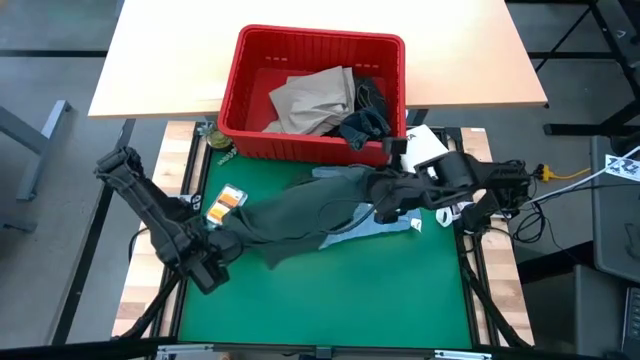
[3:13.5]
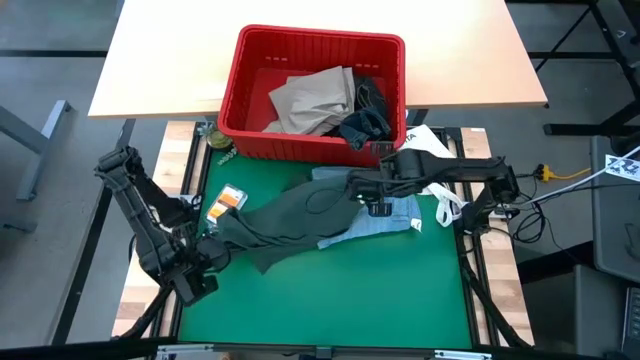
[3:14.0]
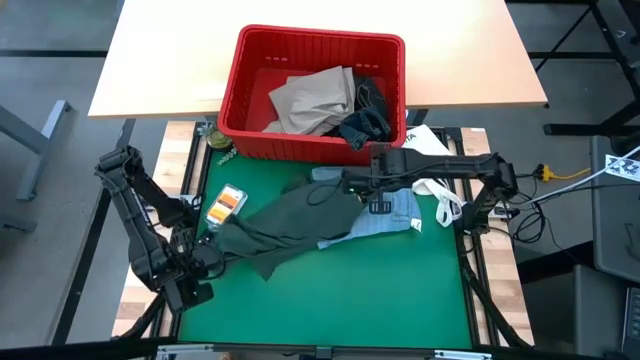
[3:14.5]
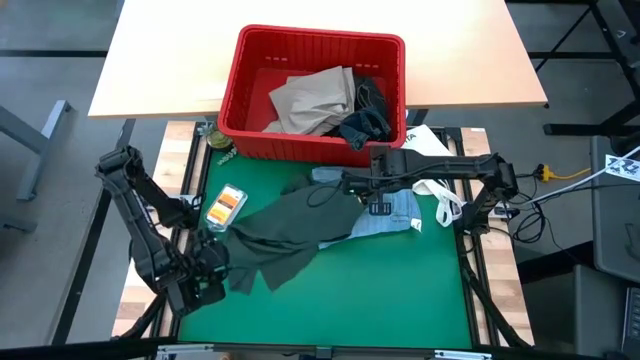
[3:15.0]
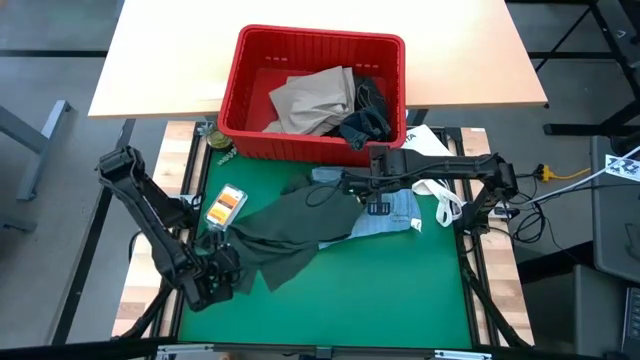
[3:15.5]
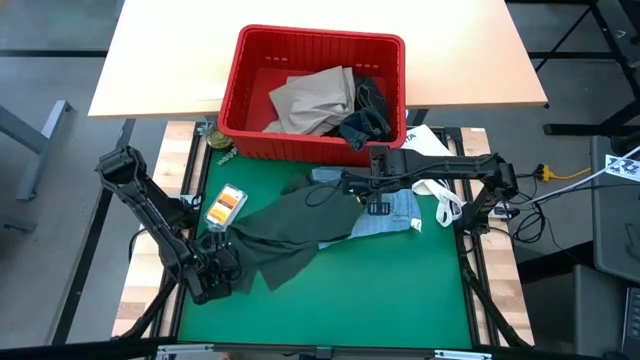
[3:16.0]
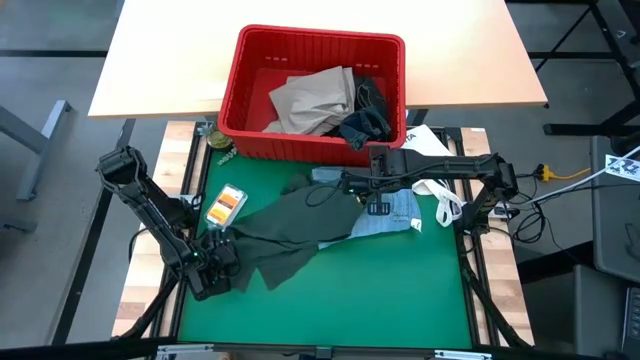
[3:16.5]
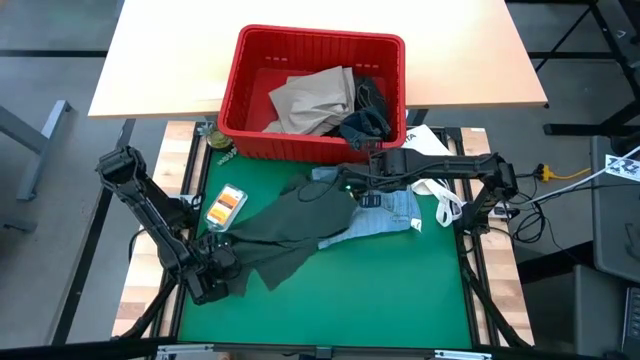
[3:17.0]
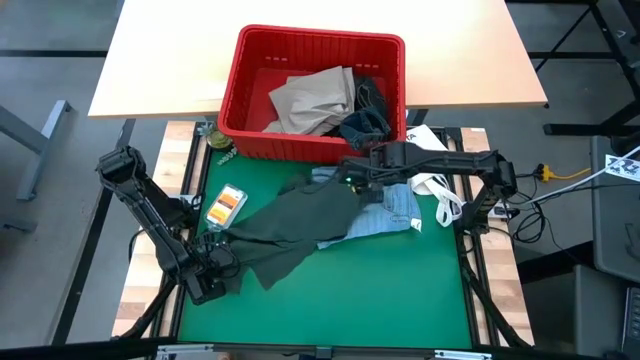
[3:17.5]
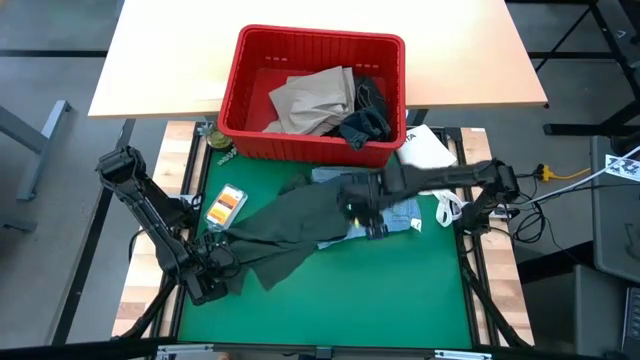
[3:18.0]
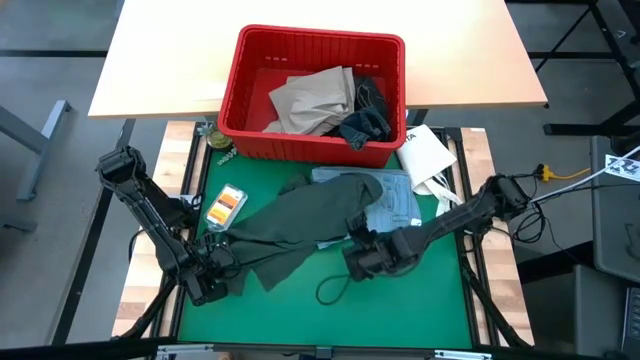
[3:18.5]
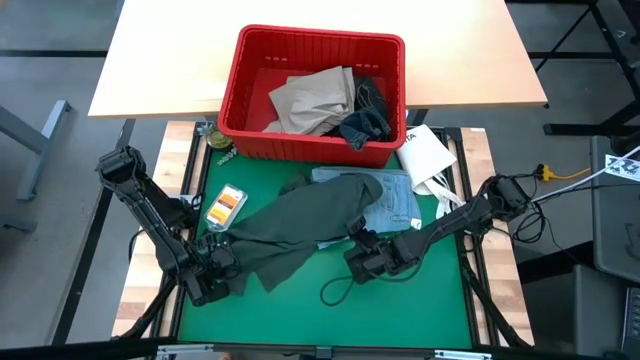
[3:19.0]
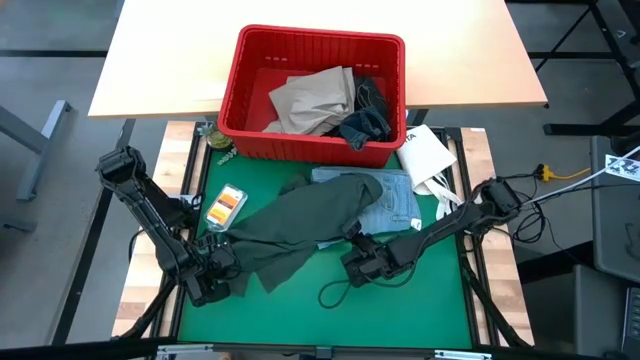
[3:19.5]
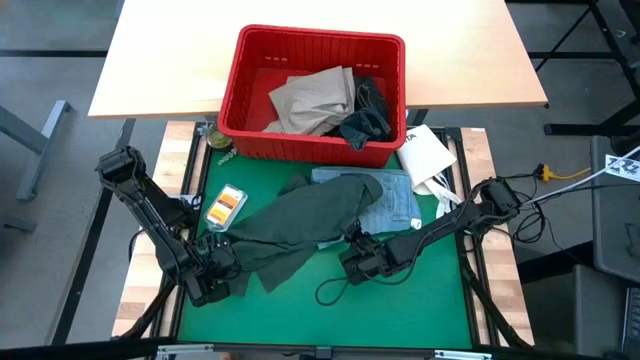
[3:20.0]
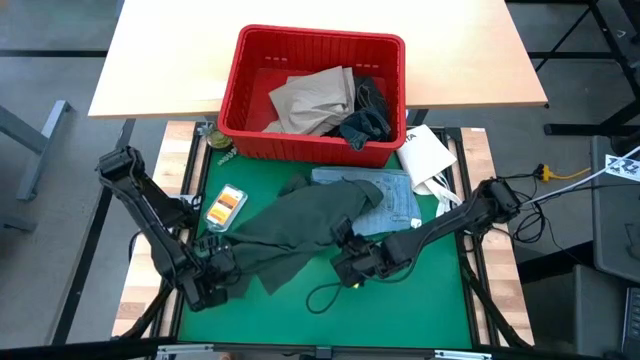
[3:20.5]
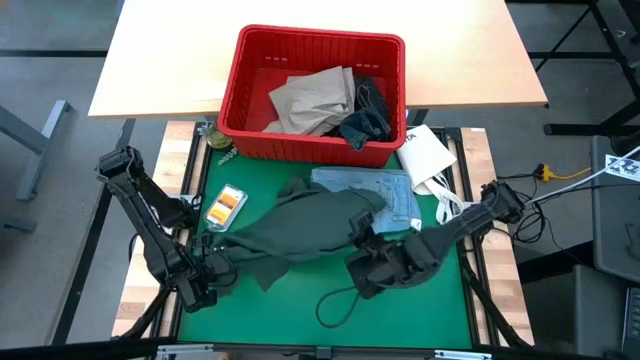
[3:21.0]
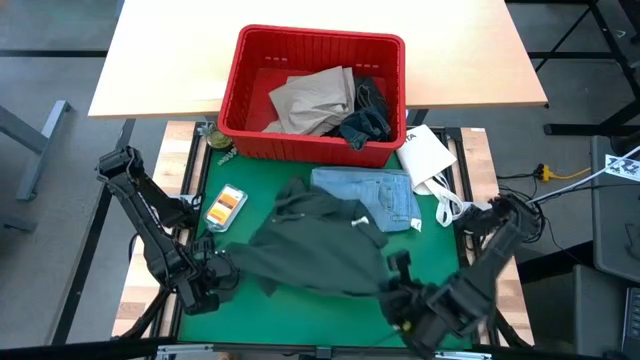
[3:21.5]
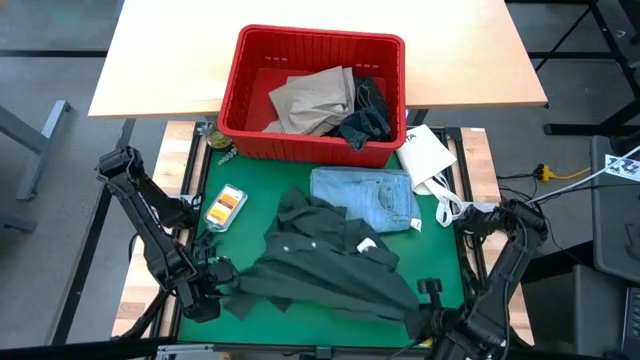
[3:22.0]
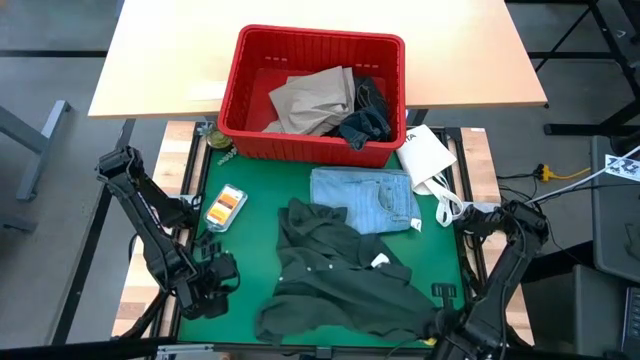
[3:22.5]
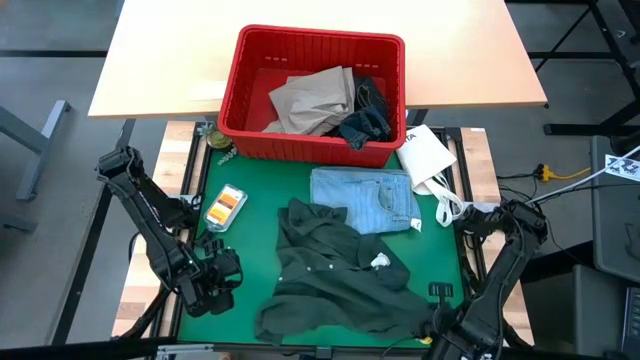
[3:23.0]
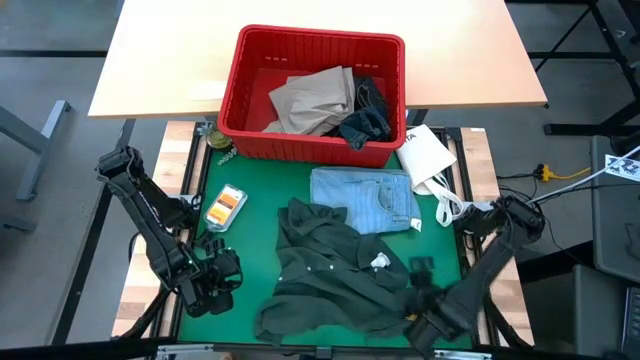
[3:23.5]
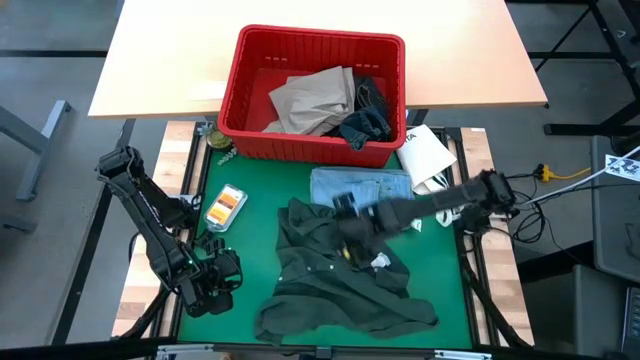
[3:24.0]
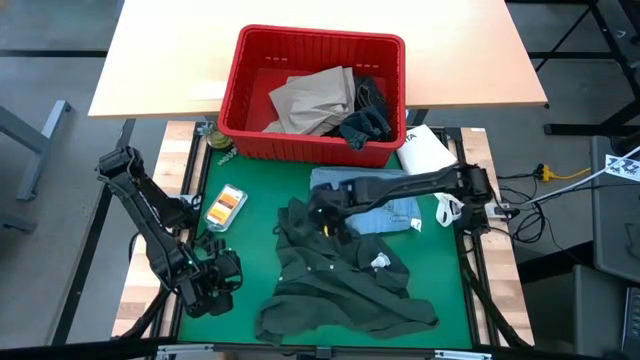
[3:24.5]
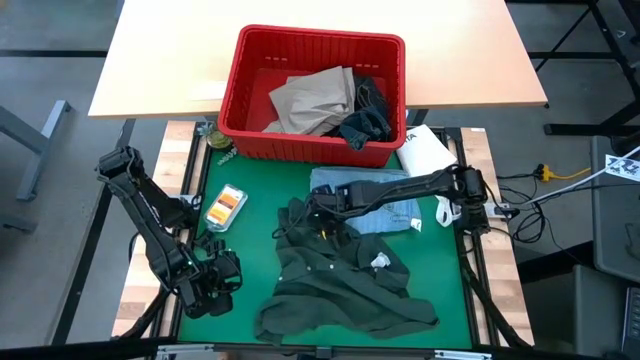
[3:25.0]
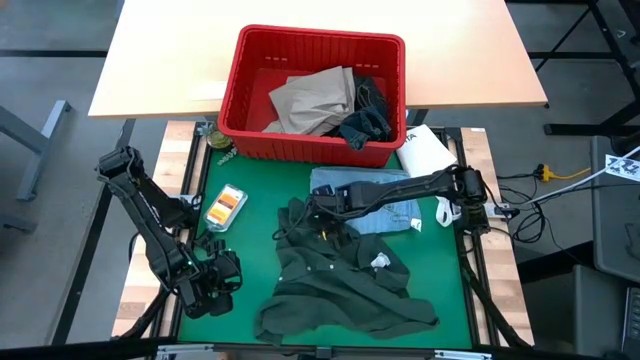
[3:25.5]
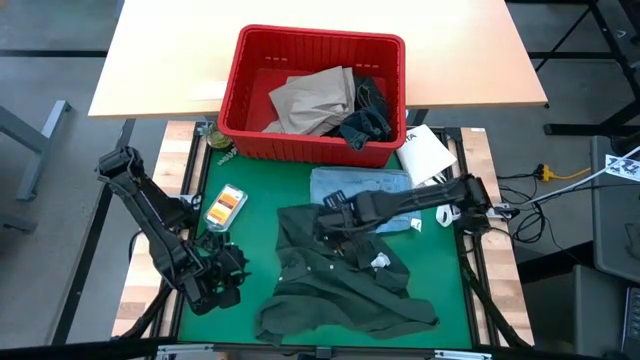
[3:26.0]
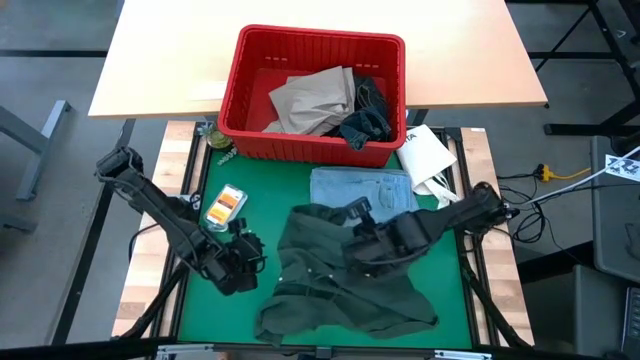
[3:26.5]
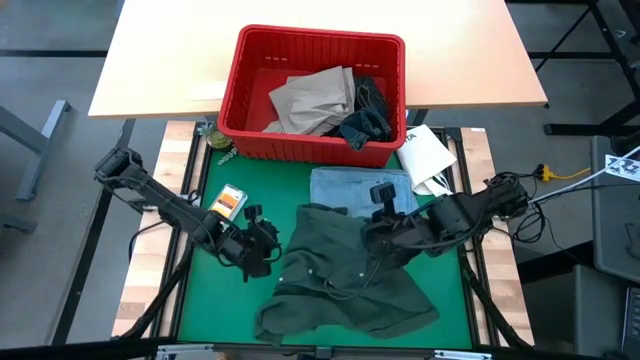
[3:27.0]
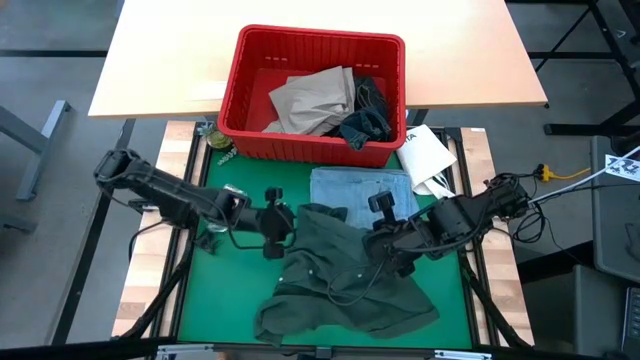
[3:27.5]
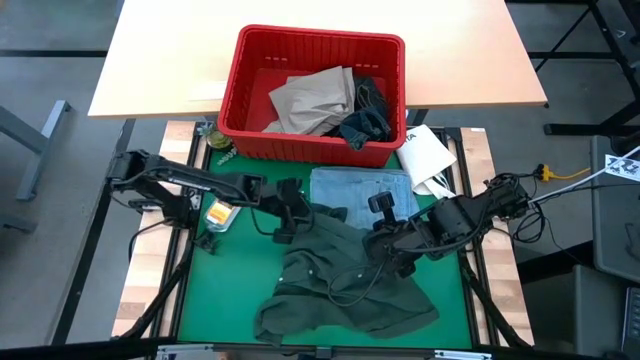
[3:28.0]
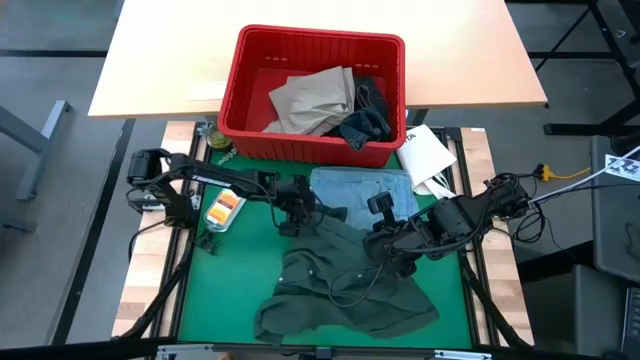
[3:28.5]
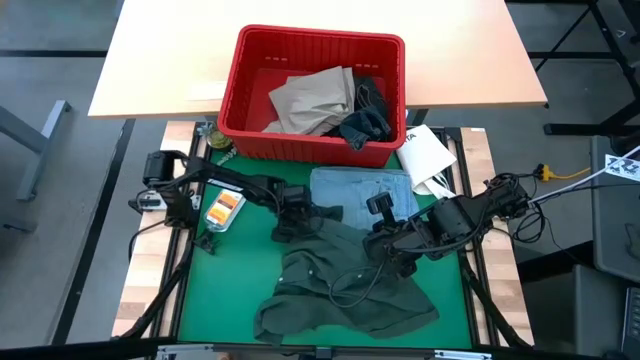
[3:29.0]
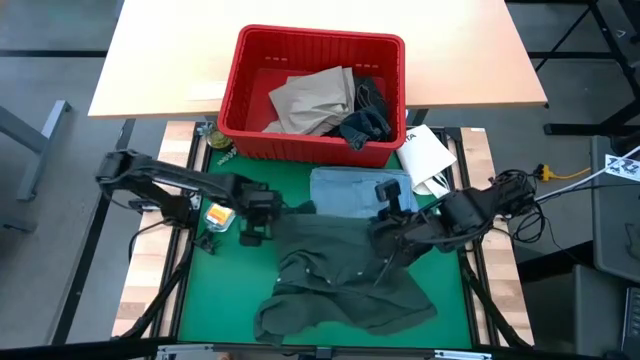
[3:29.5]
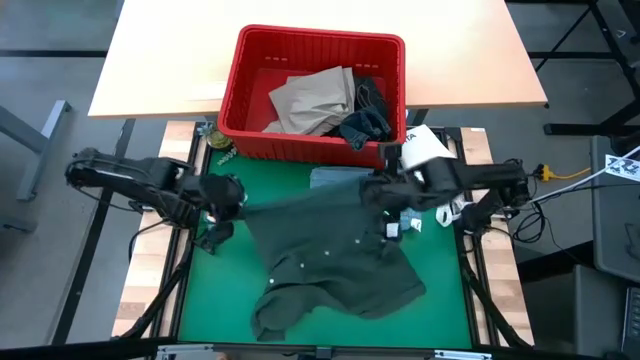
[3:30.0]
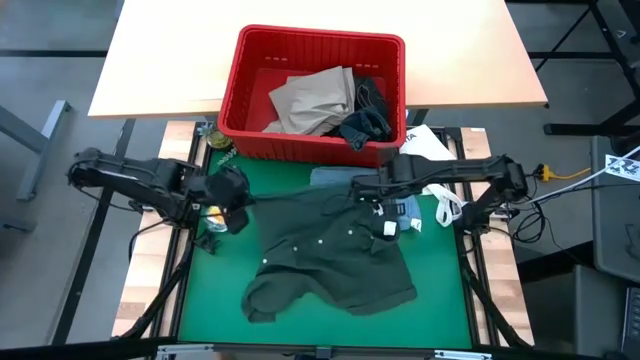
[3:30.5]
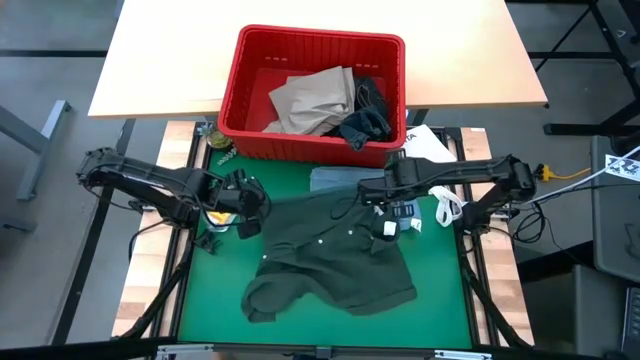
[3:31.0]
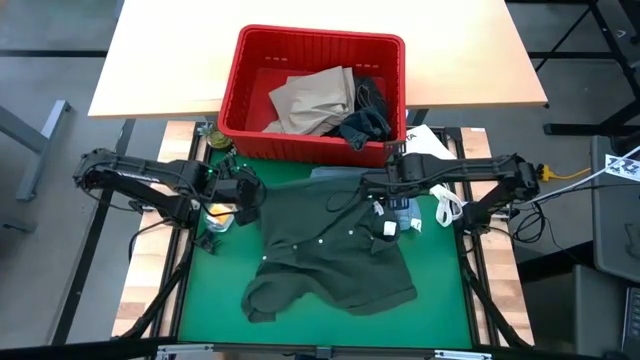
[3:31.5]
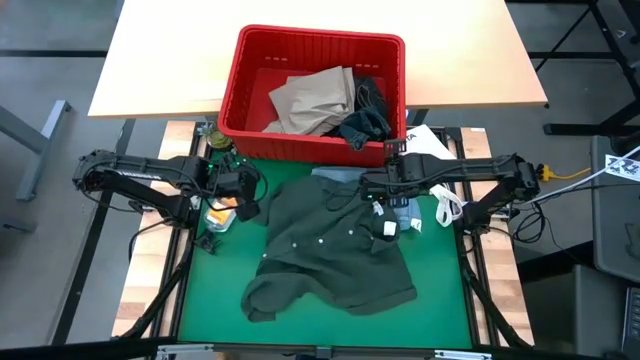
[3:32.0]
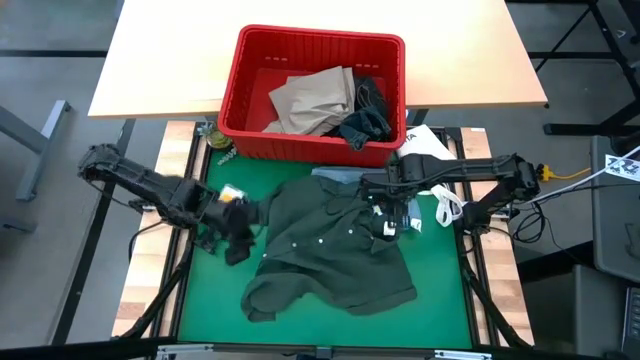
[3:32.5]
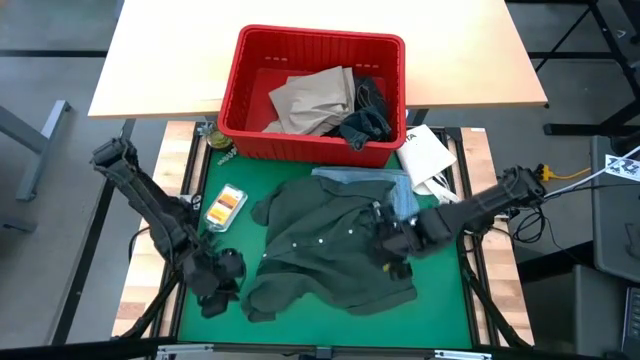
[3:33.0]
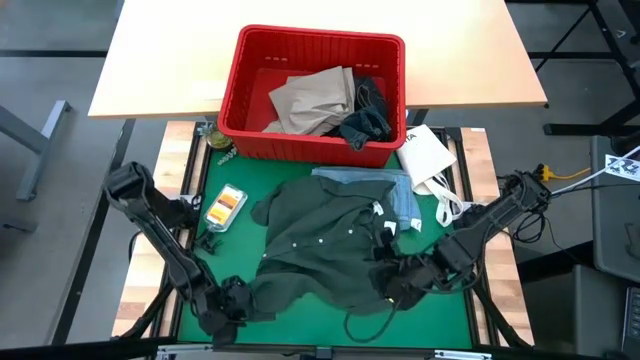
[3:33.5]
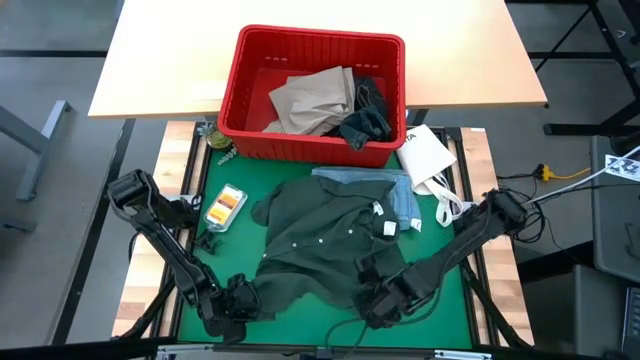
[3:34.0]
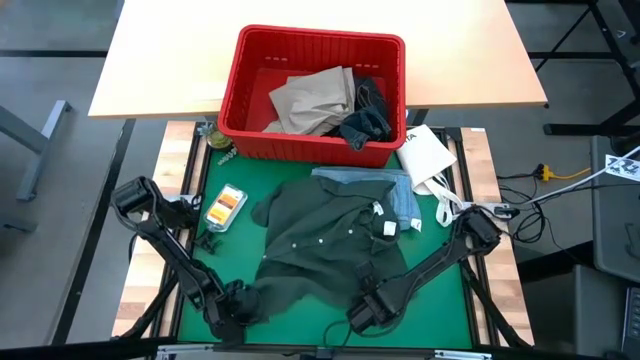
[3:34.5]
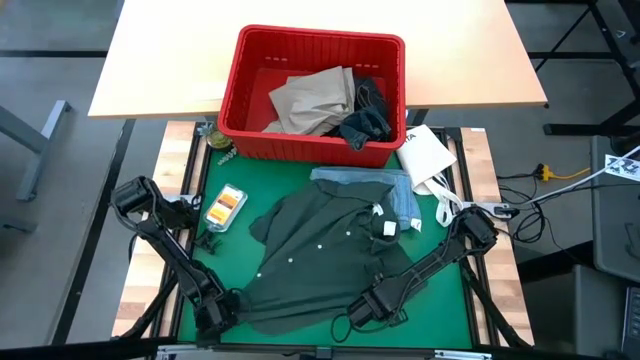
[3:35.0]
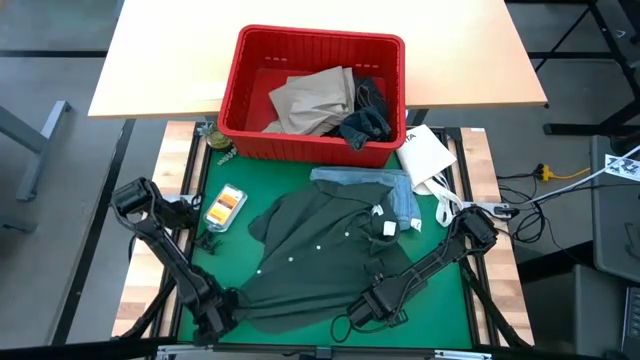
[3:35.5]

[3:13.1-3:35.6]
Task: Fold Laundry from Bin
Fold the green polo shirt
